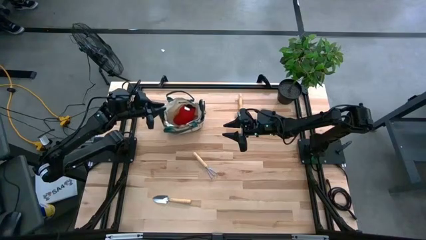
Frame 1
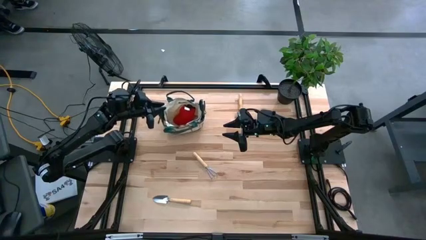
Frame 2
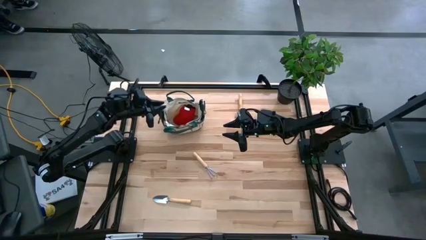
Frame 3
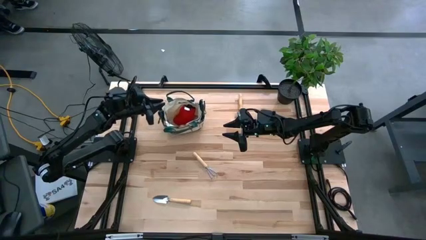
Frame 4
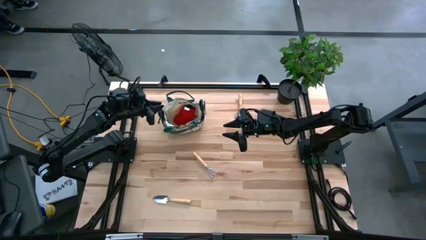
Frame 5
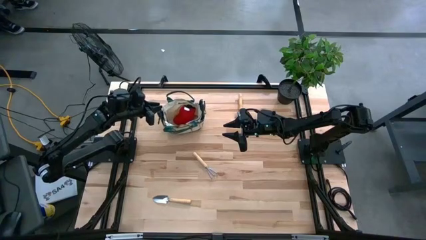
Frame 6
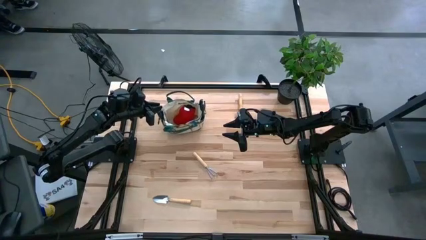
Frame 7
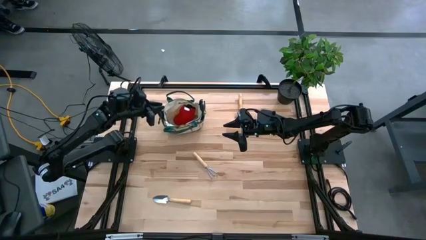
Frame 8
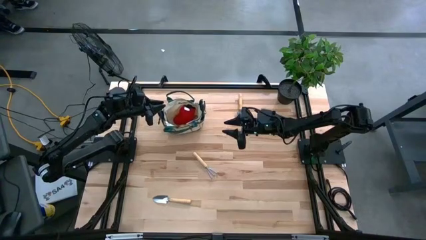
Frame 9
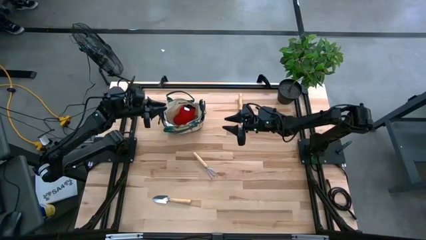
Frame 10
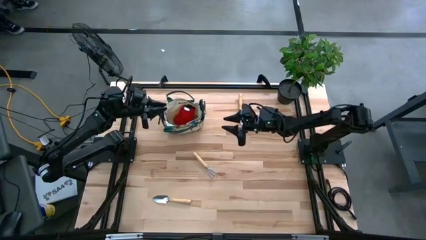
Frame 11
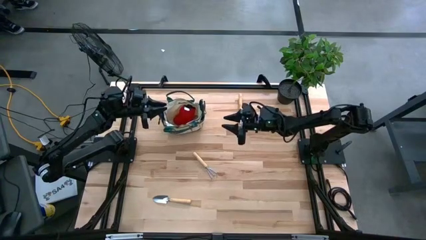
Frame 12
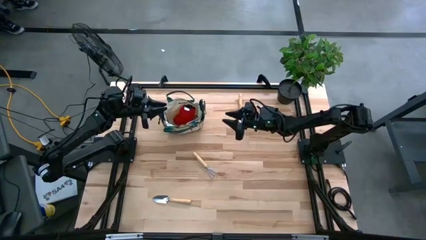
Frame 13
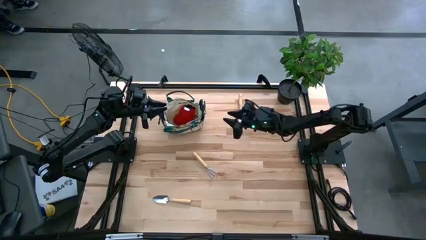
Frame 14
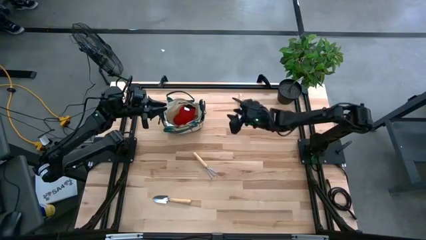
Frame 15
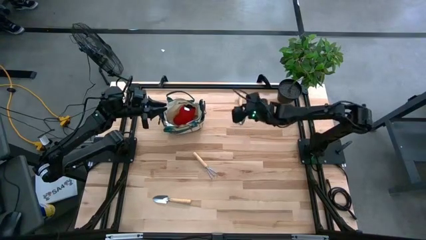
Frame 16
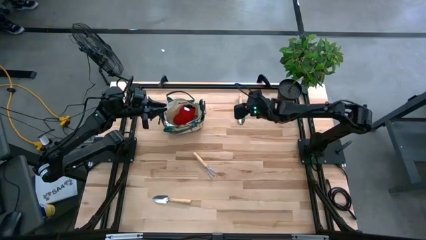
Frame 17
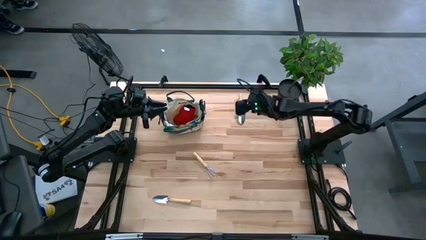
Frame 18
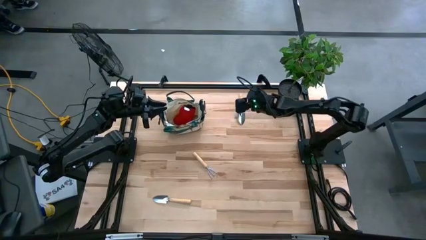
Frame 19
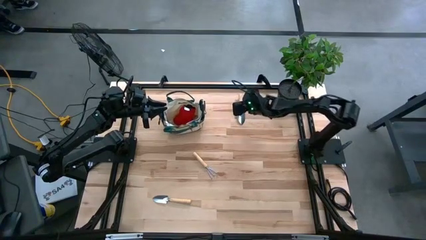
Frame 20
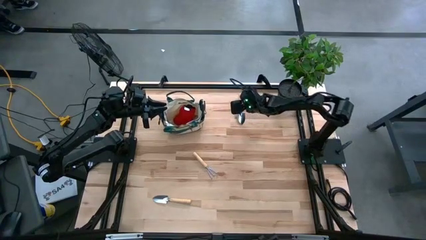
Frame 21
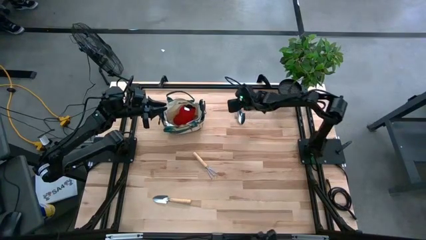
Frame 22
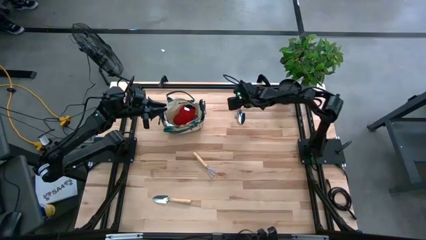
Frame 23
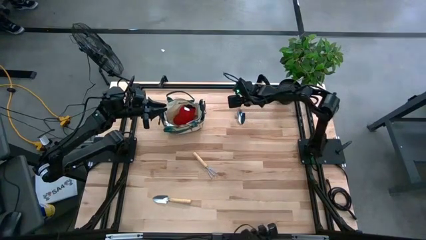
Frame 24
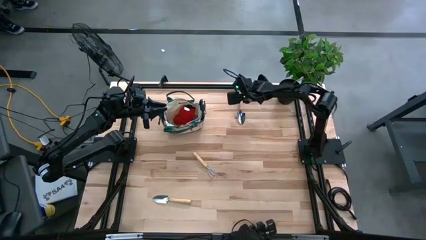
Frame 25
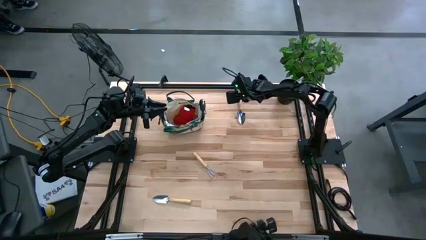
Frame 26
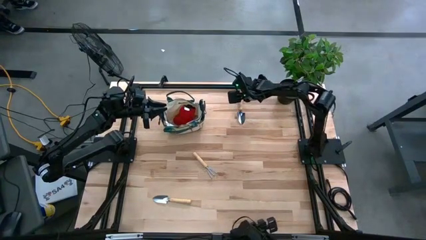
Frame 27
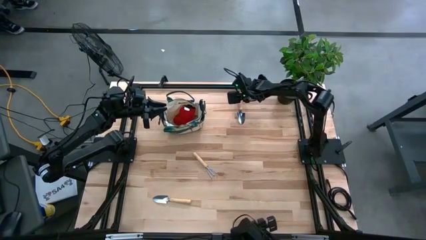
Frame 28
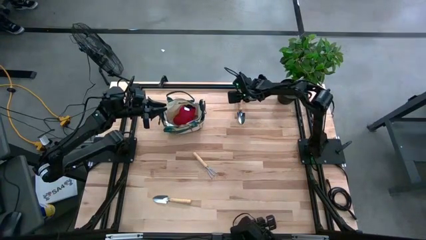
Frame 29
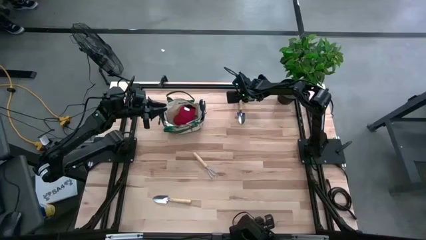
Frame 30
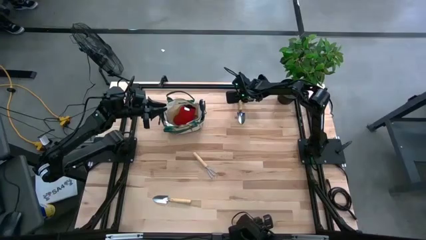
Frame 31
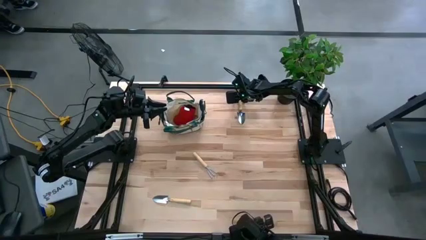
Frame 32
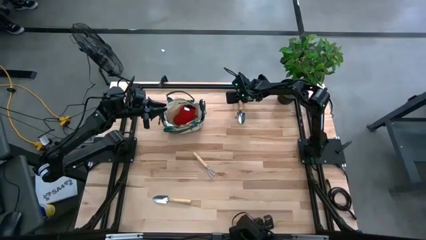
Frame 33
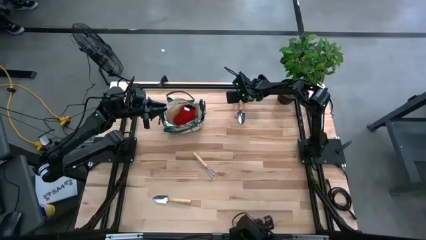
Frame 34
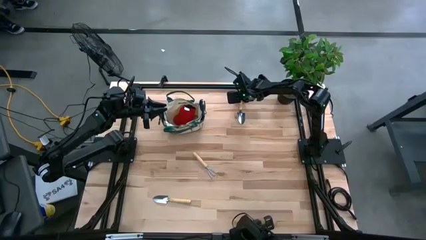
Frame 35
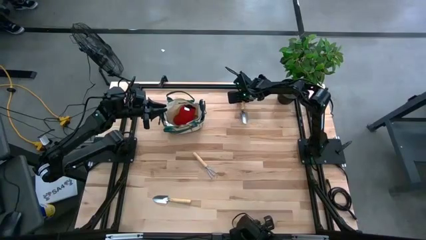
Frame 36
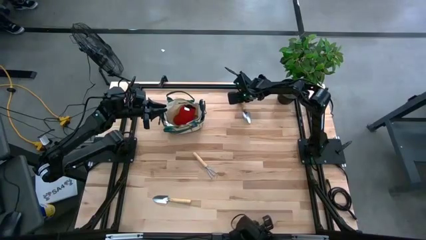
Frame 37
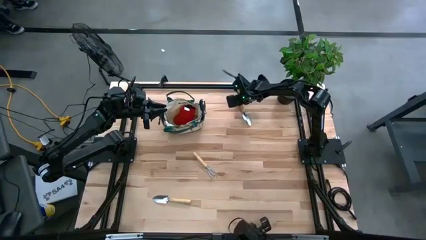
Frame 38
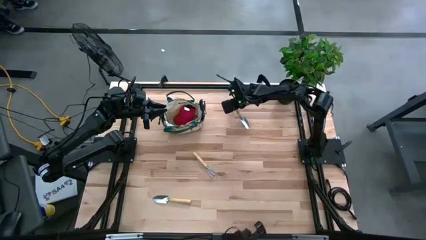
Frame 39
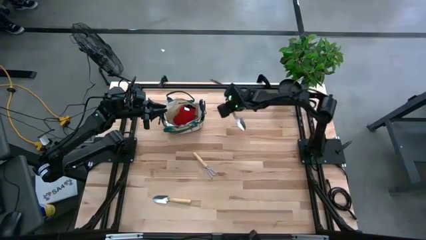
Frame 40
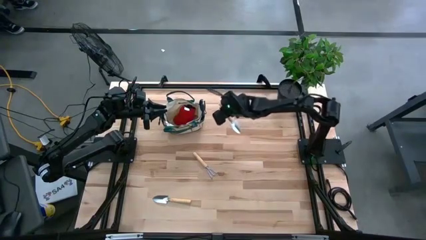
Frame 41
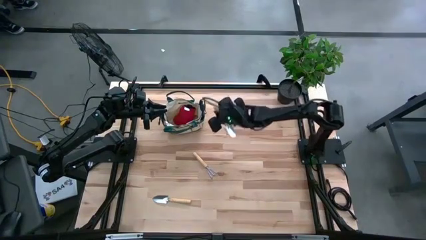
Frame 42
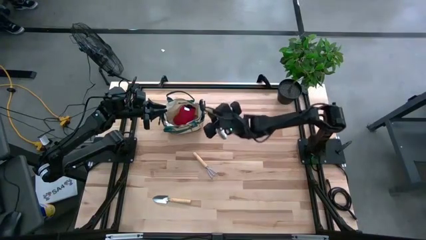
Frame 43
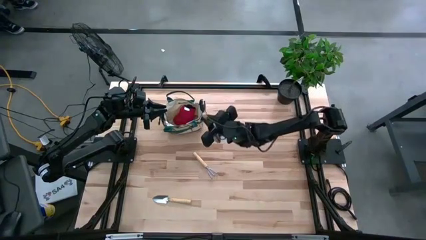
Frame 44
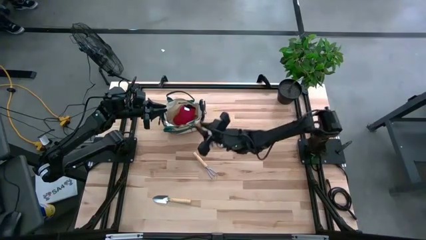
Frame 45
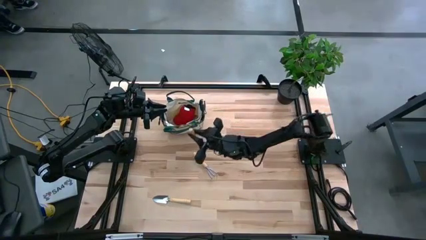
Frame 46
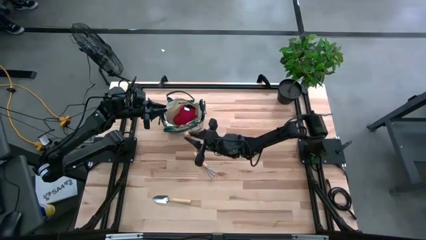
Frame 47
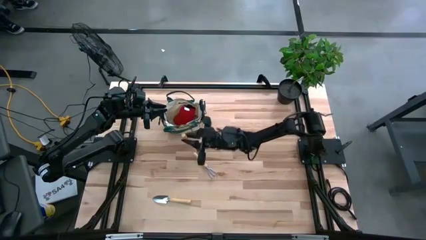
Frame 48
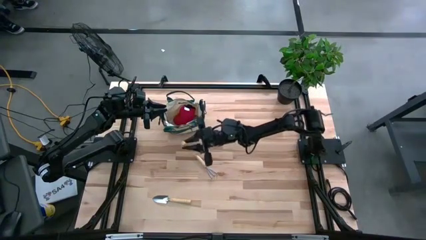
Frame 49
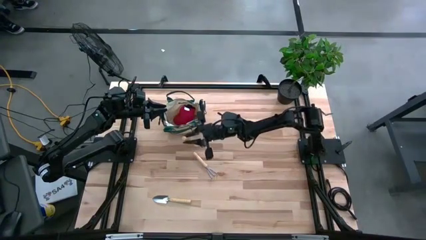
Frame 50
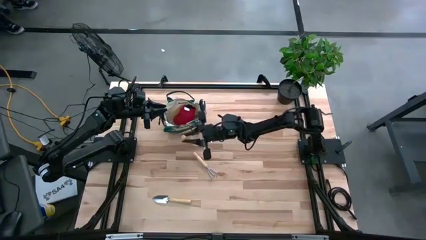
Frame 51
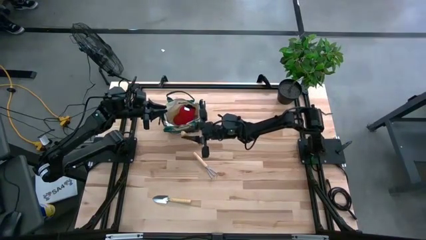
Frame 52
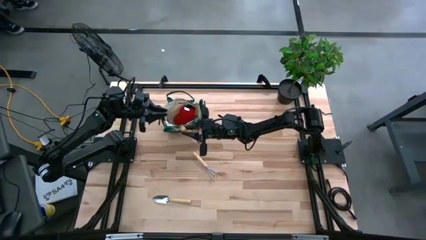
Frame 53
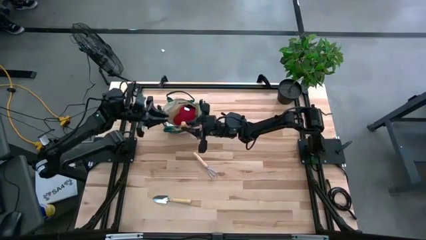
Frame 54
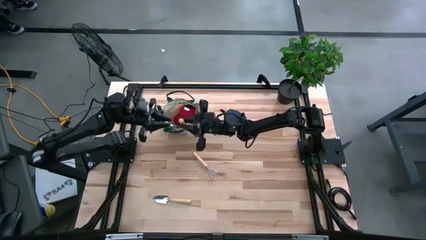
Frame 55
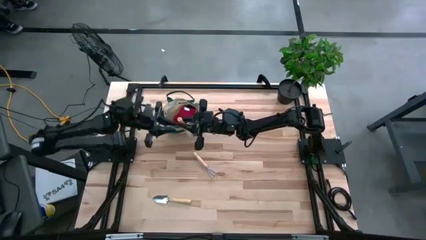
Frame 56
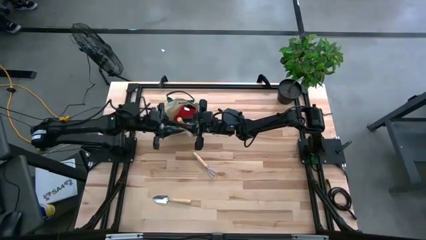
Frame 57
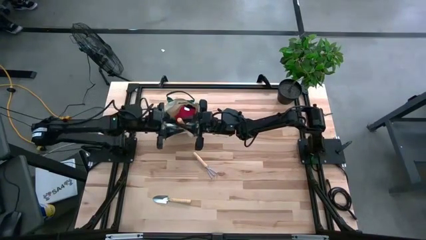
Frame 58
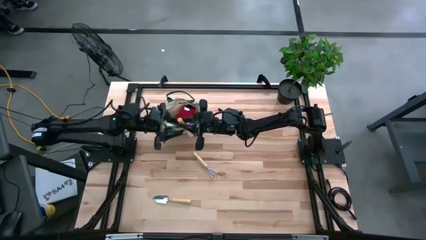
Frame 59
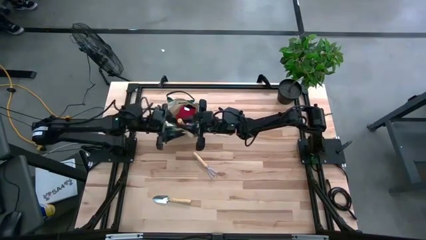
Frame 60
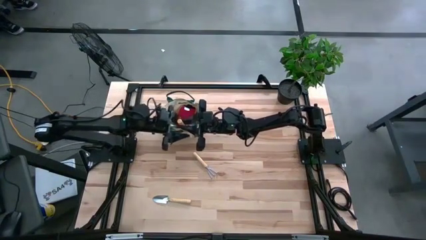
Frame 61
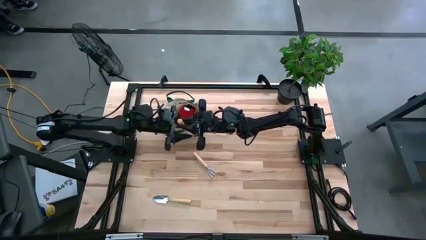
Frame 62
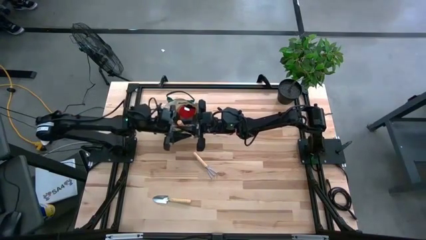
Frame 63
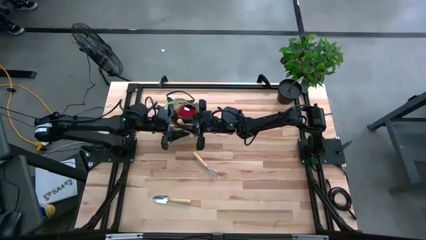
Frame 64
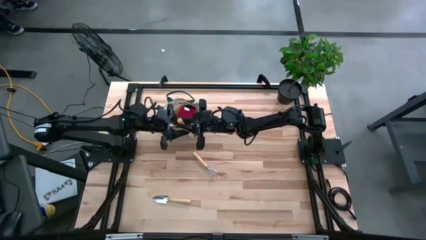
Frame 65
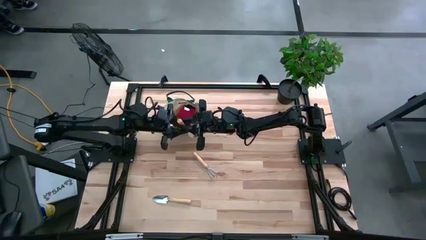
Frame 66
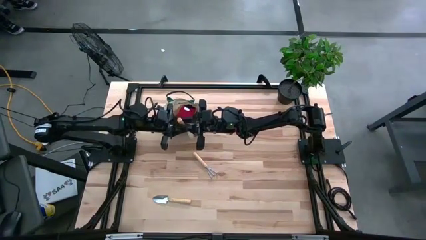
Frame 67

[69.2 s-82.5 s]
Task: Pick & Place Garden tools in Gardening bag
Put the brown trowel into the gardening bag
